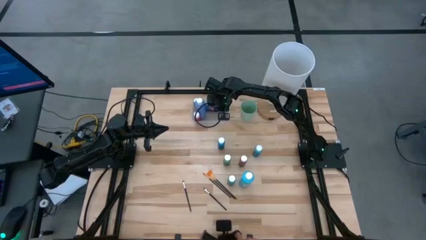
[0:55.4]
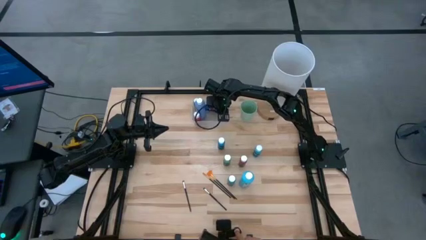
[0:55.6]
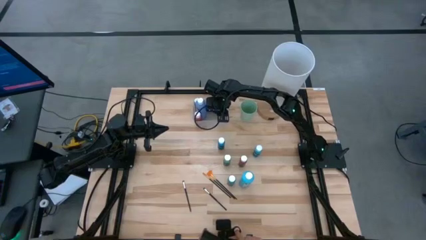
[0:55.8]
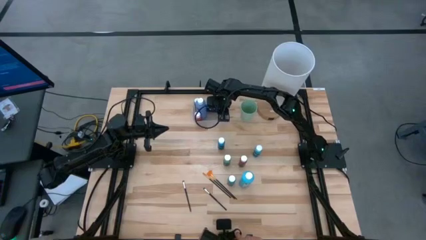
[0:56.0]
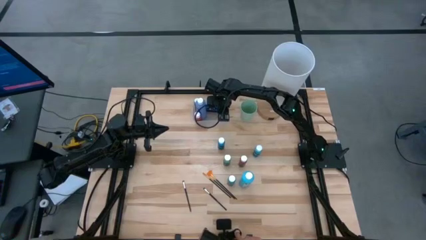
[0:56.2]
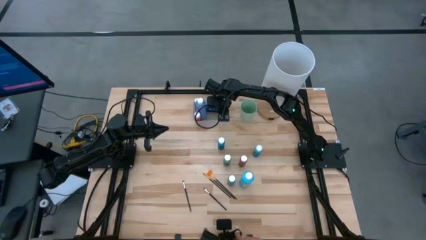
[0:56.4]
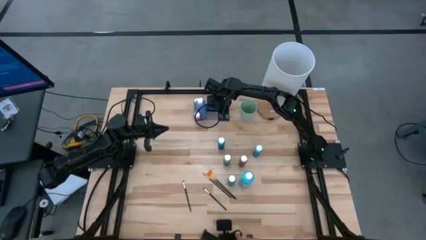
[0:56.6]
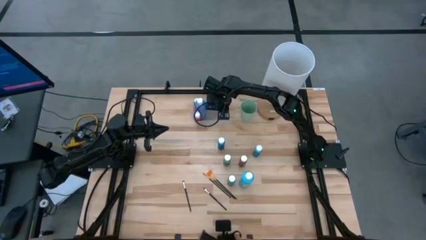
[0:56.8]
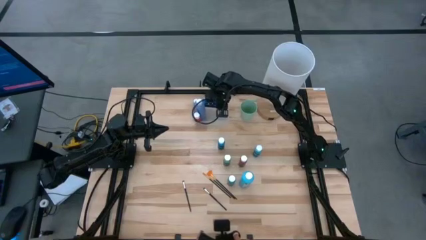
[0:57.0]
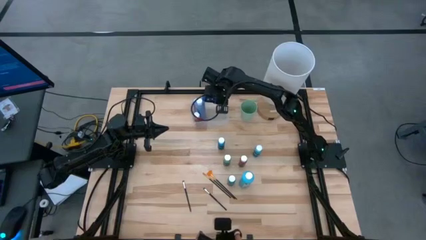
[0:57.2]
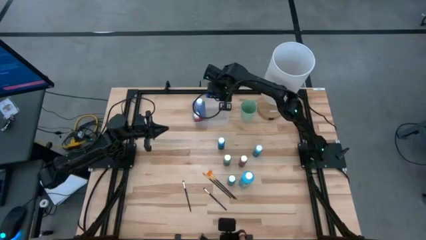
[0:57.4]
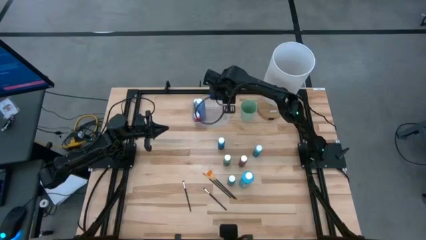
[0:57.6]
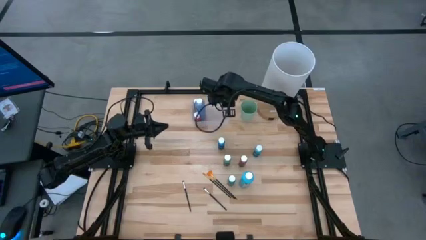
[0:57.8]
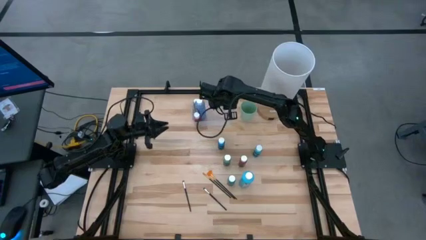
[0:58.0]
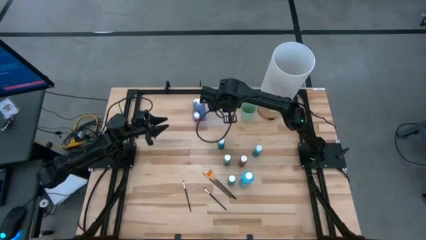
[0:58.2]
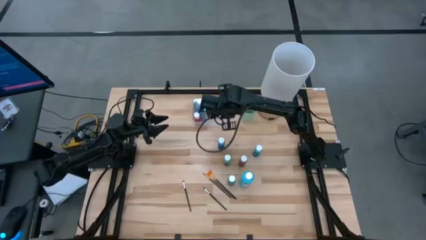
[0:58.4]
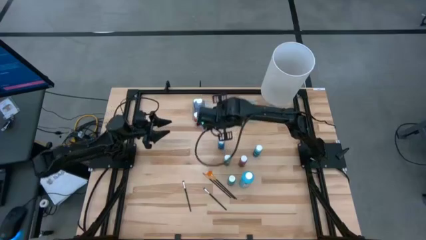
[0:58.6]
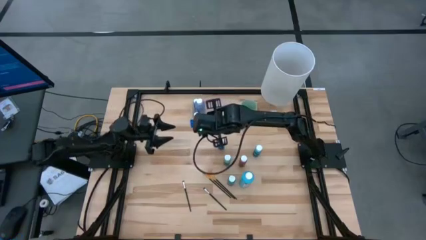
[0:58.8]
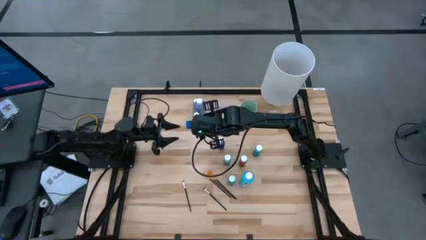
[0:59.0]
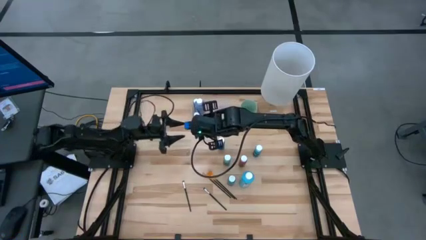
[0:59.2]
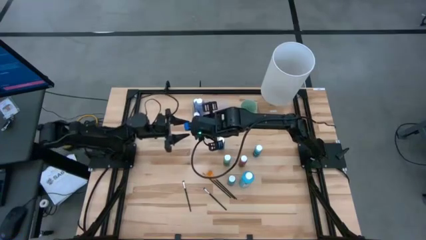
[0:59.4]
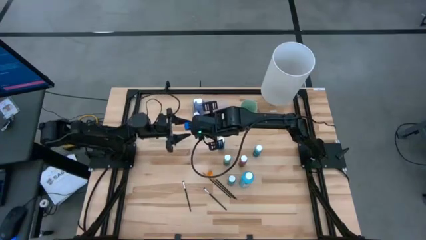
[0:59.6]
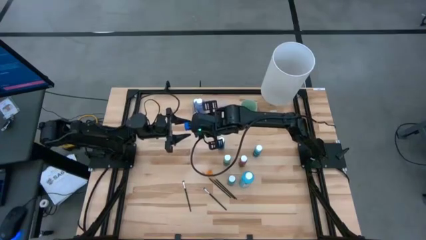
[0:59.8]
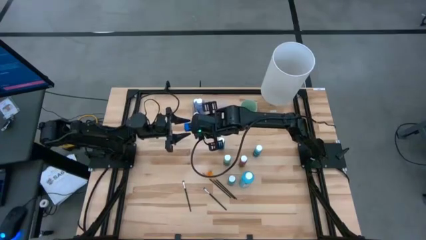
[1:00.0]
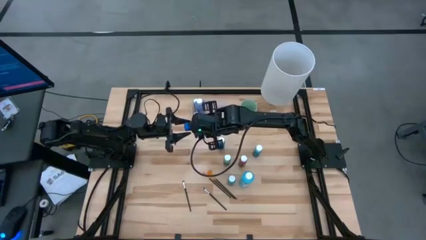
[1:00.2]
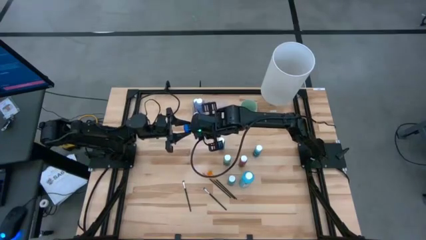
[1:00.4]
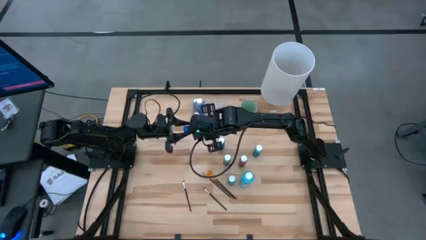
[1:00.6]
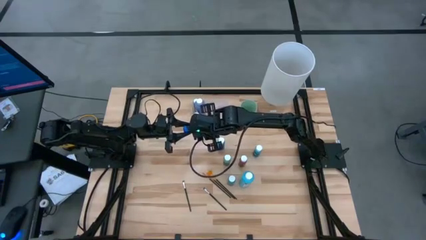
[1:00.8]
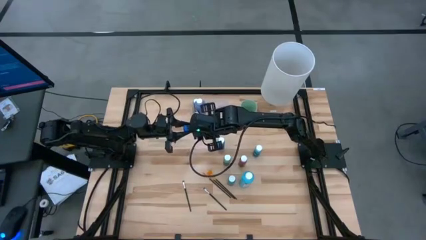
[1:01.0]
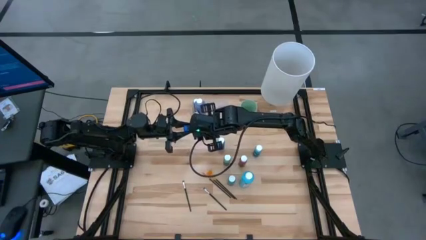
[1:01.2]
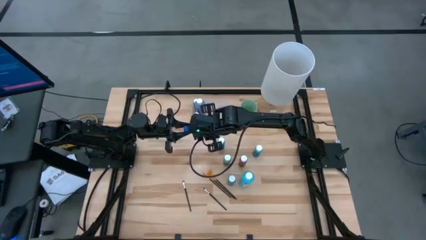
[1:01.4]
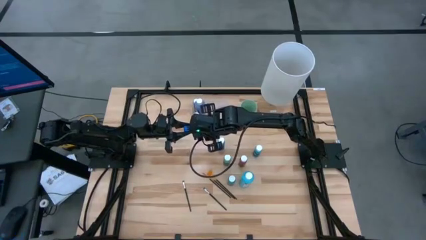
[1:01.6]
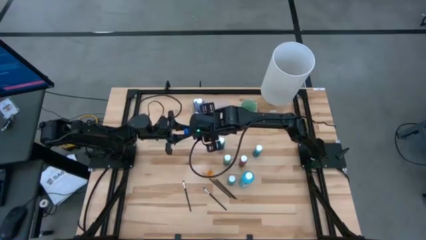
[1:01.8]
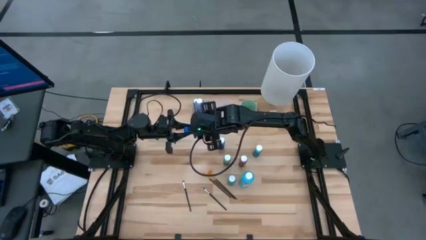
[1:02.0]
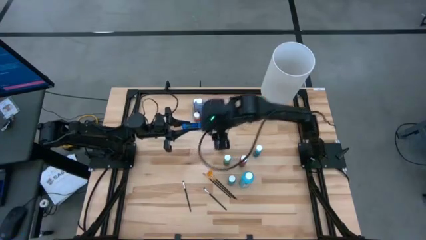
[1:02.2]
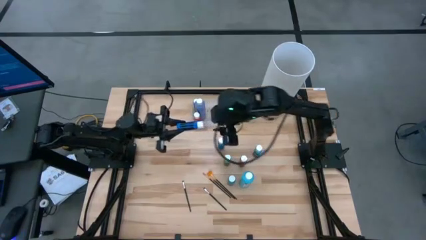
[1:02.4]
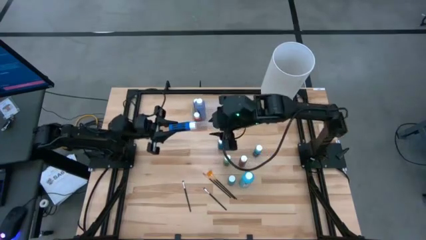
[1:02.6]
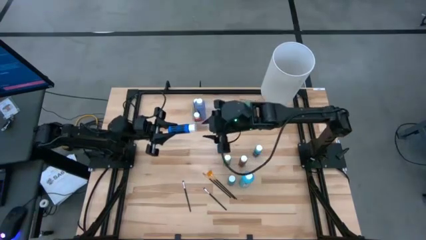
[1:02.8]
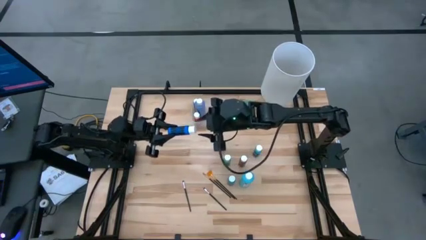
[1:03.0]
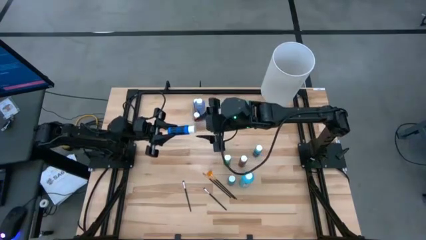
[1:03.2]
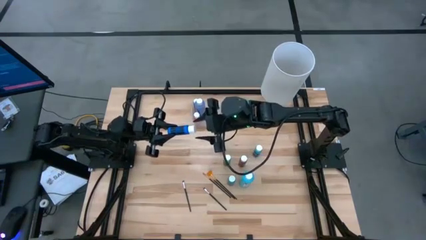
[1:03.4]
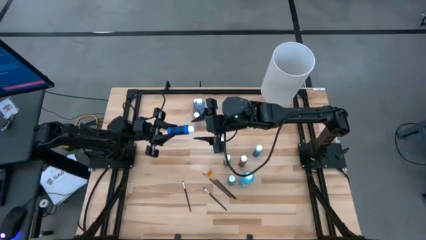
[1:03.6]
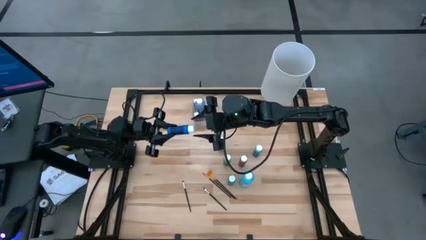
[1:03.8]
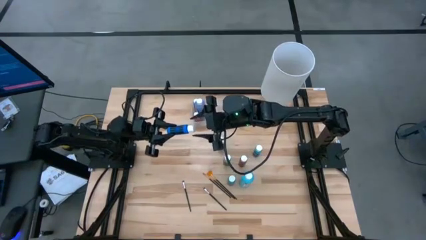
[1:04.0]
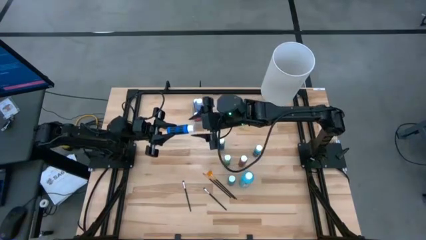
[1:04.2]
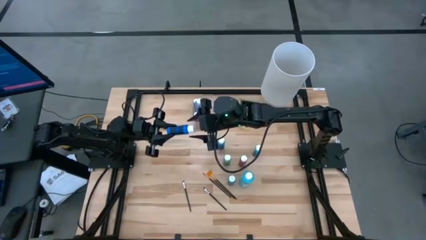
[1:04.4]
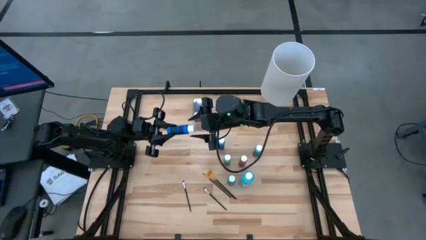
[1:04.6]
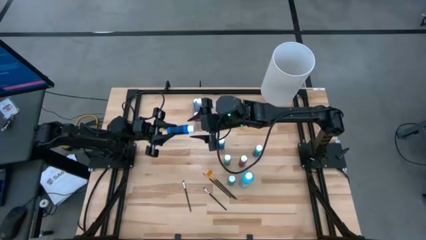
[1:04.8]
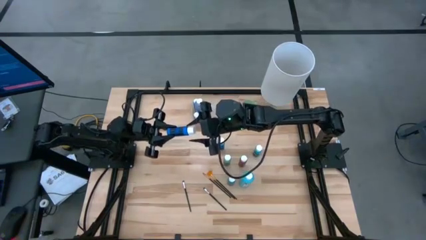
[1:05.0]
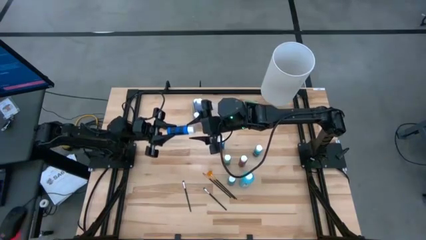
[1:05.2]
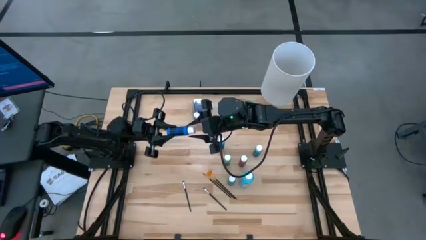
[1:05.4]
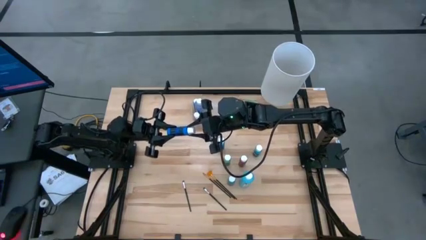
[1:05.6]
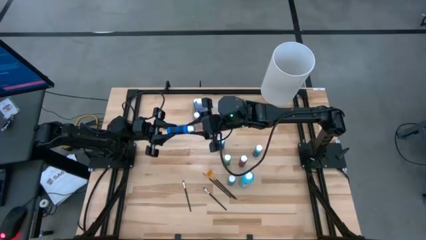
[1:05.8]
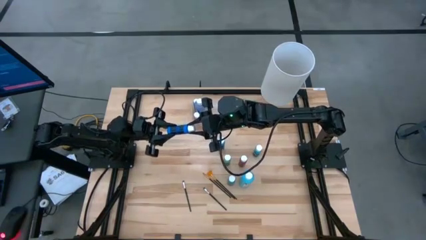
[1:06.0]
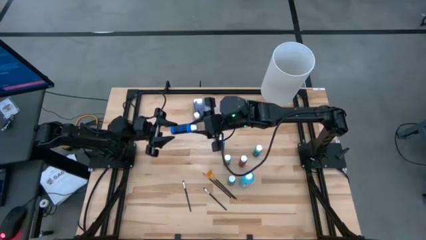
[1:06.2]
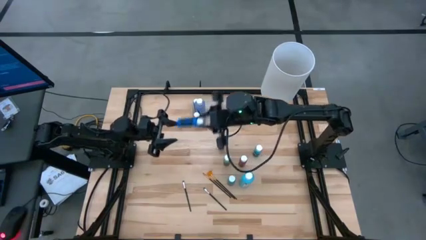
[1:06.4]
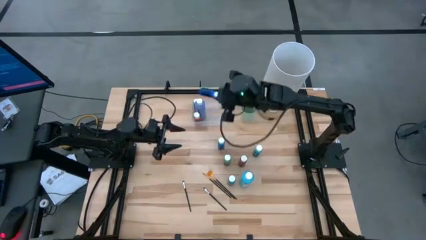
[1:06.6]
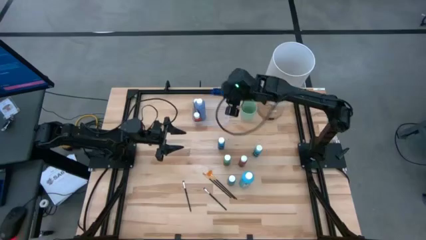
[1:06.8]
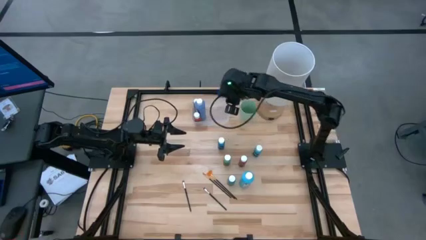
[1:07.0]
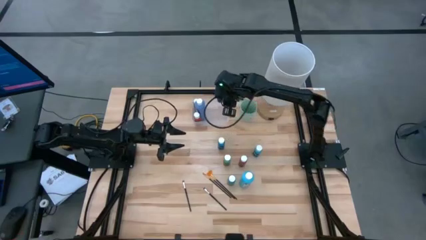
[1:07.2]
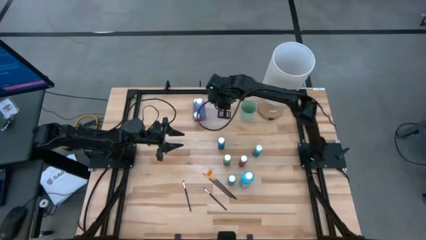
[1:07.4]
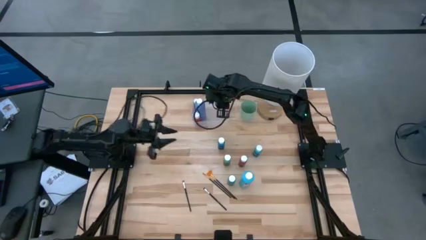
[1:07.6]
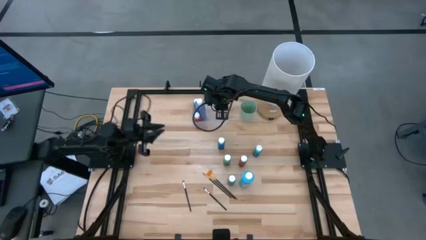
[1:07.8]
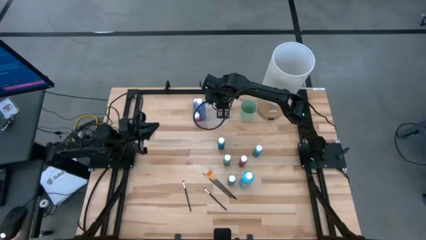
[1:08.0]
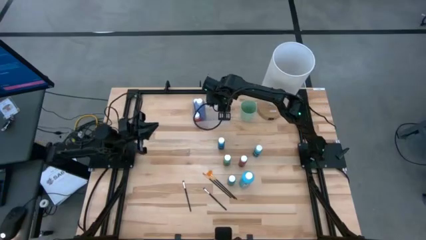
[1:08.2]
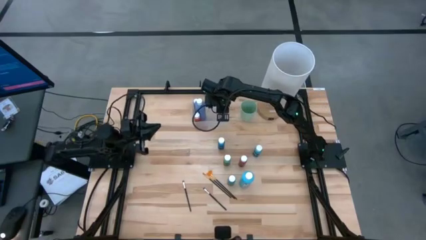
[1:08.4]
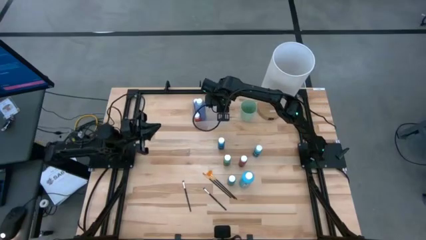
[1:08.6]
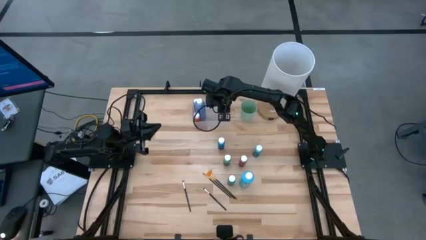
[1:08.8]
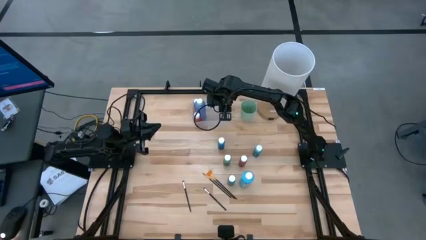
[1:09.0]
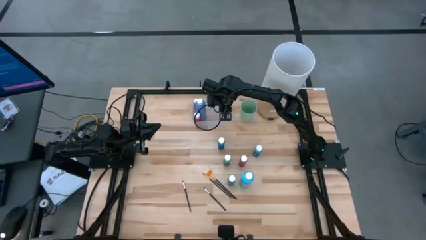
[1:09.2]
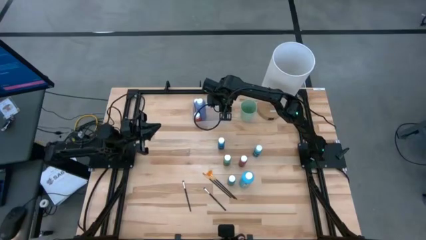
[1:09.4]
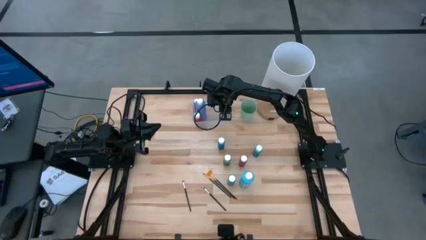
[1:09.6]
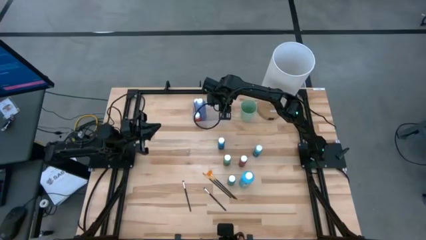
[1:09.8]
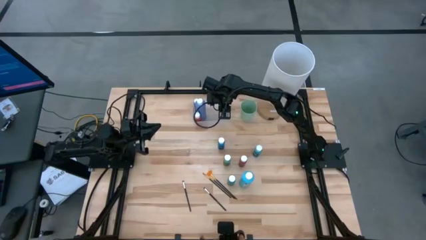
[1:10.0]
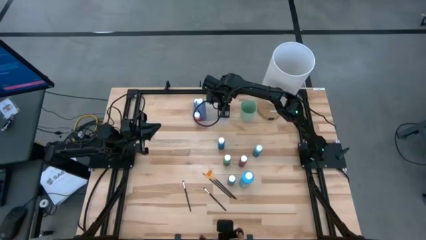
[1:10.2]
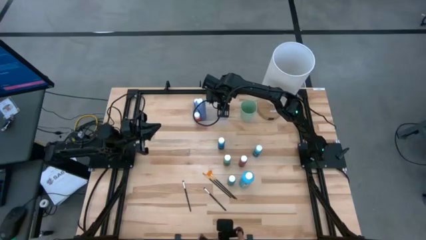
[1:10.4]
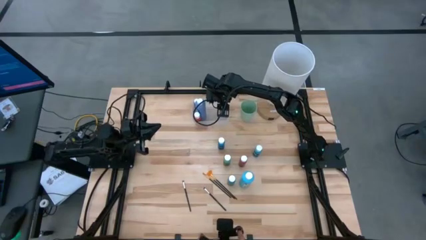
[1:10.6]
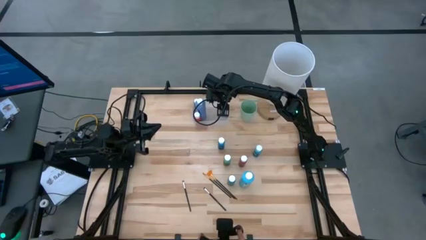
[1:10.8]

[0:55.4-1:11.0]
Task: Pick & Place Paint Supplies
Put the small bottom blue paint bottle into the transparent bin
